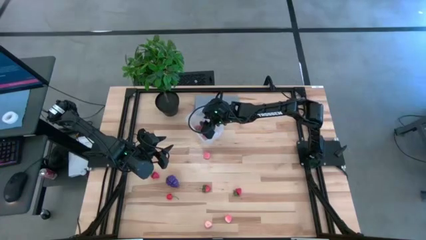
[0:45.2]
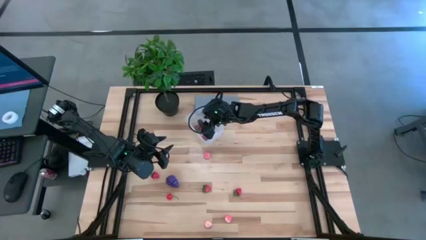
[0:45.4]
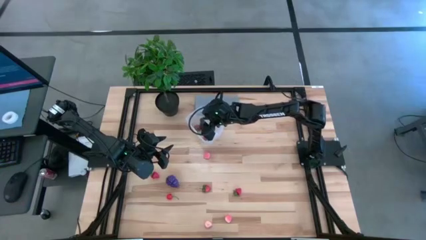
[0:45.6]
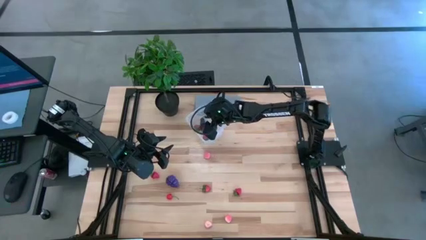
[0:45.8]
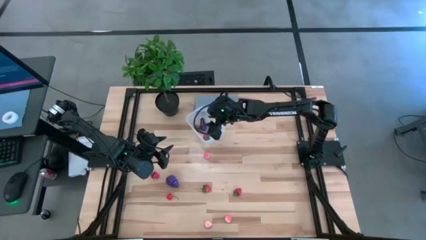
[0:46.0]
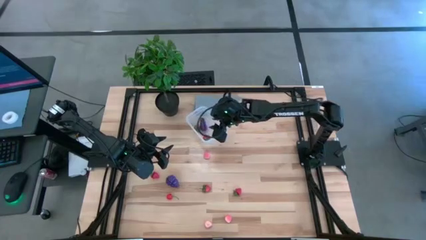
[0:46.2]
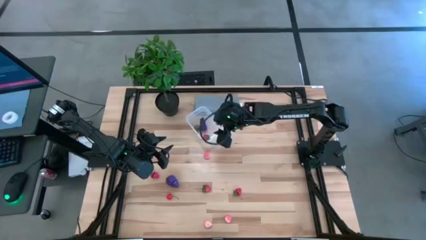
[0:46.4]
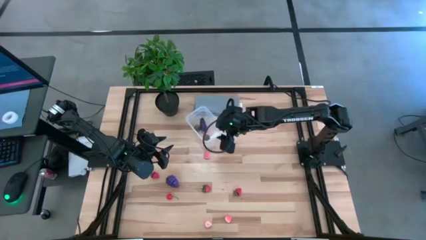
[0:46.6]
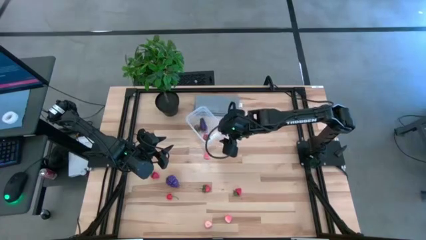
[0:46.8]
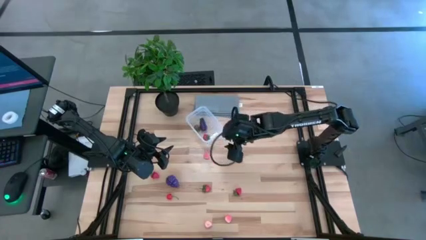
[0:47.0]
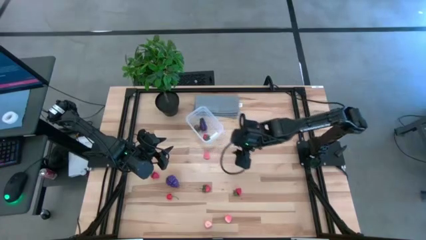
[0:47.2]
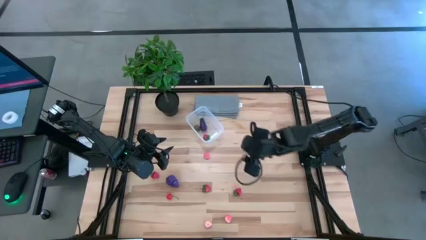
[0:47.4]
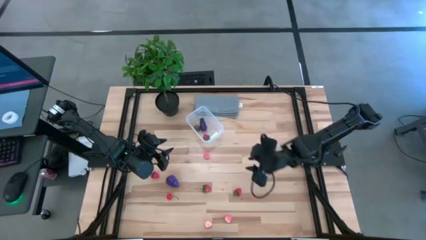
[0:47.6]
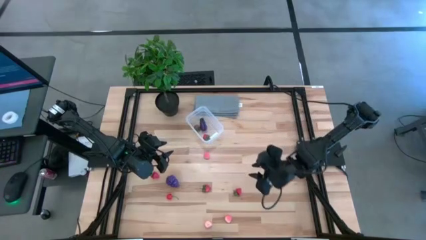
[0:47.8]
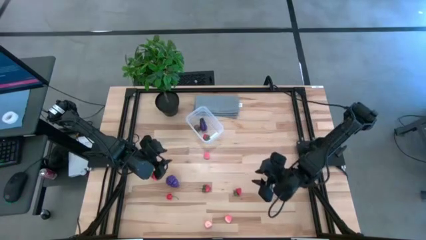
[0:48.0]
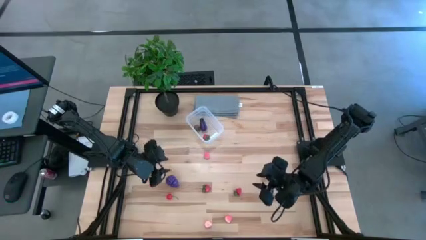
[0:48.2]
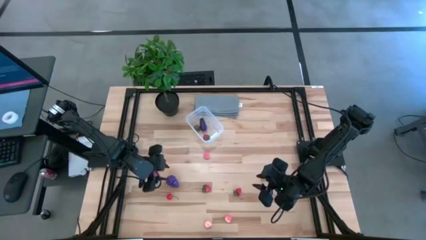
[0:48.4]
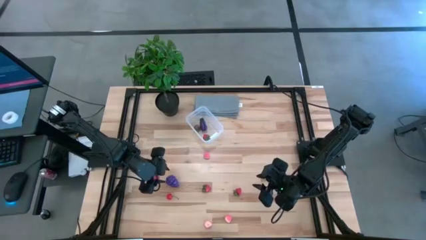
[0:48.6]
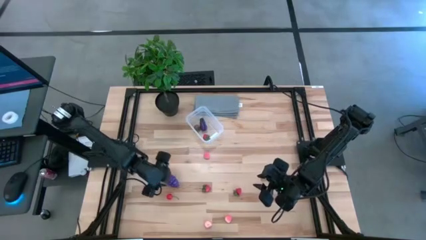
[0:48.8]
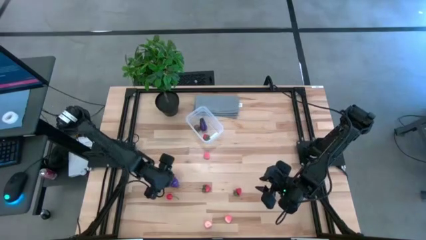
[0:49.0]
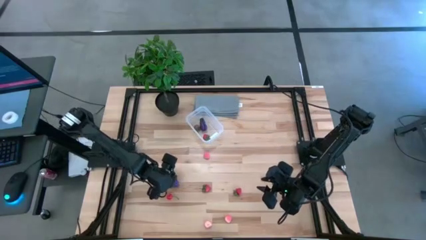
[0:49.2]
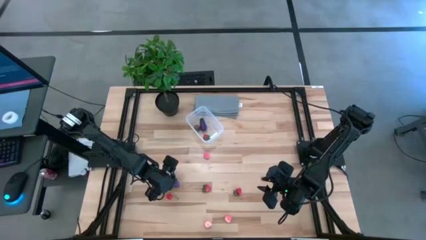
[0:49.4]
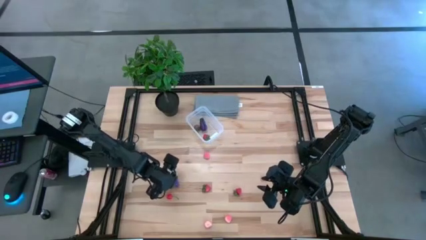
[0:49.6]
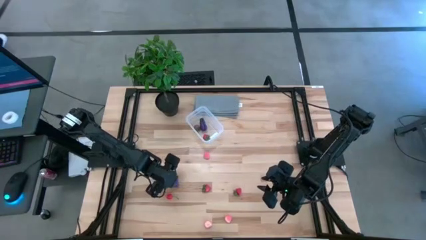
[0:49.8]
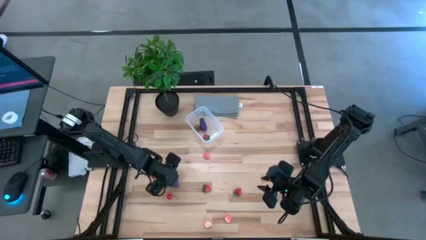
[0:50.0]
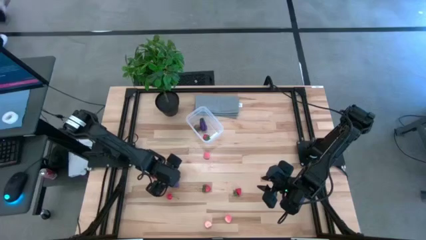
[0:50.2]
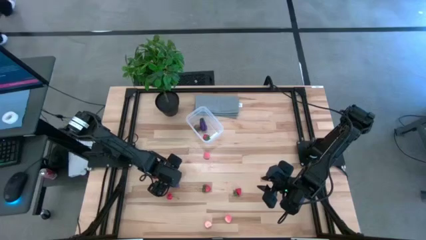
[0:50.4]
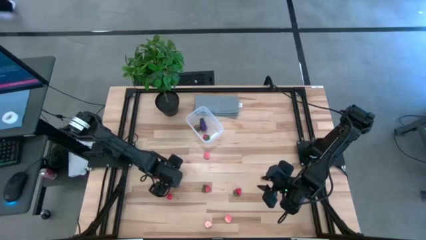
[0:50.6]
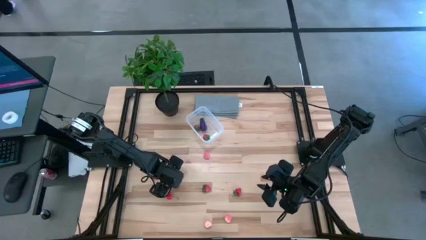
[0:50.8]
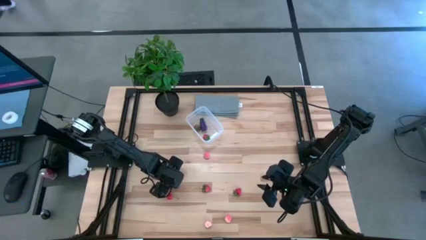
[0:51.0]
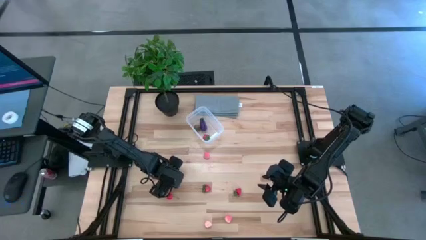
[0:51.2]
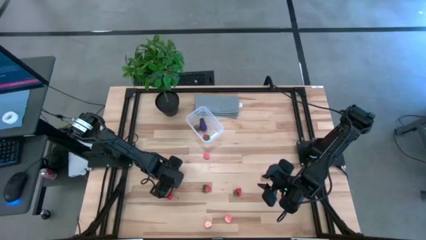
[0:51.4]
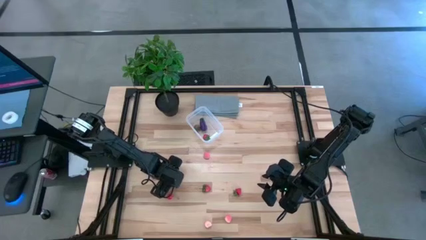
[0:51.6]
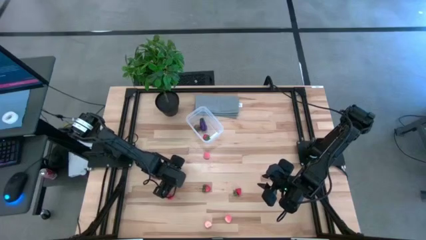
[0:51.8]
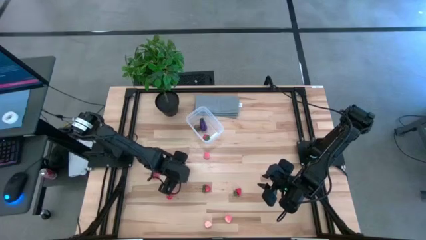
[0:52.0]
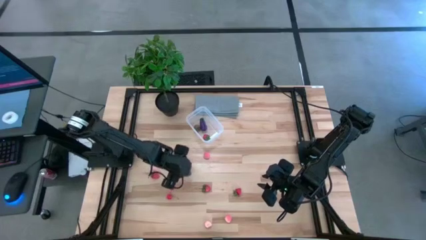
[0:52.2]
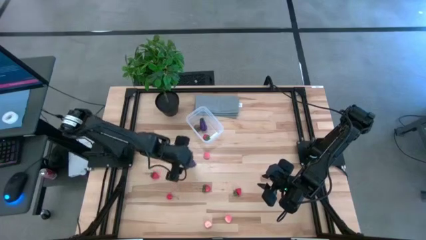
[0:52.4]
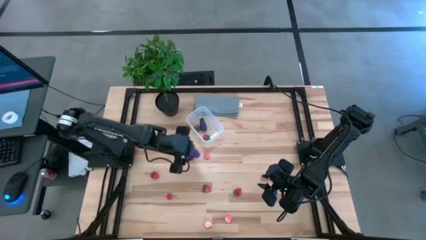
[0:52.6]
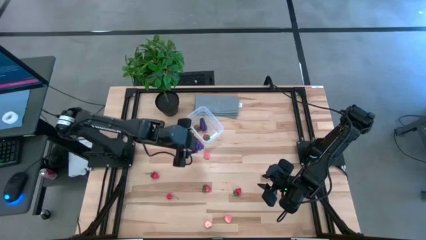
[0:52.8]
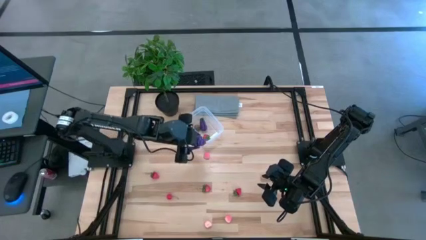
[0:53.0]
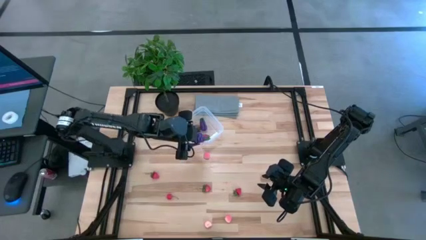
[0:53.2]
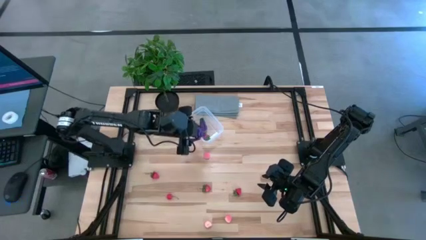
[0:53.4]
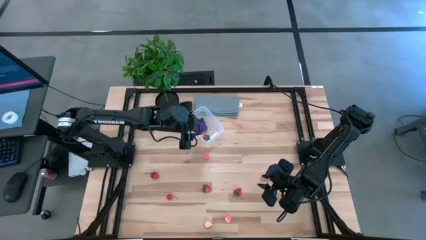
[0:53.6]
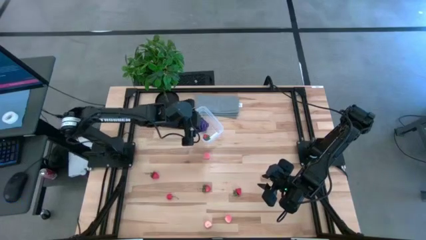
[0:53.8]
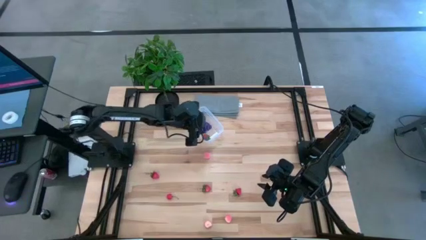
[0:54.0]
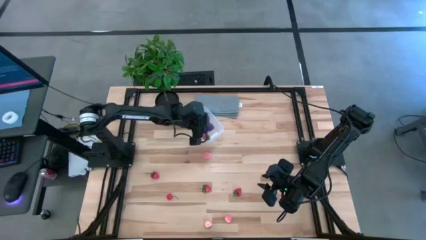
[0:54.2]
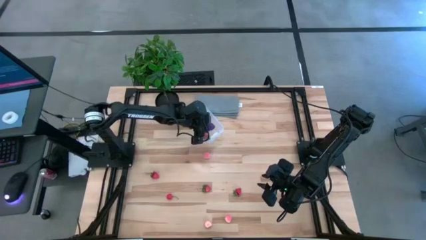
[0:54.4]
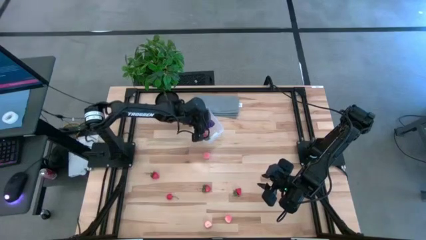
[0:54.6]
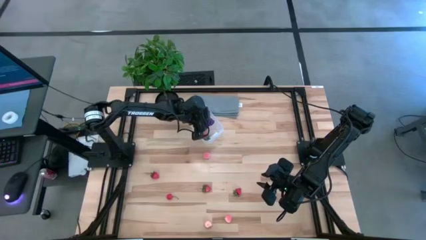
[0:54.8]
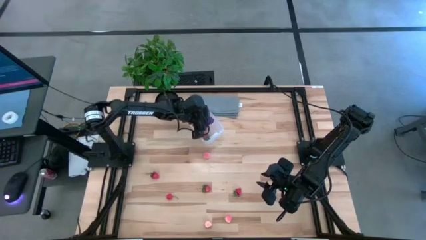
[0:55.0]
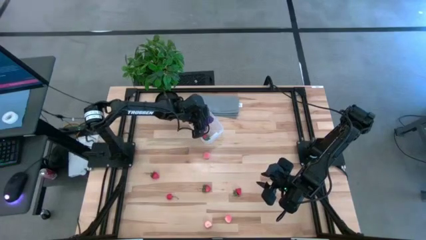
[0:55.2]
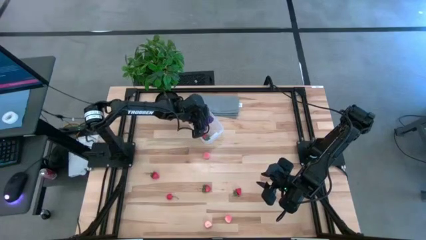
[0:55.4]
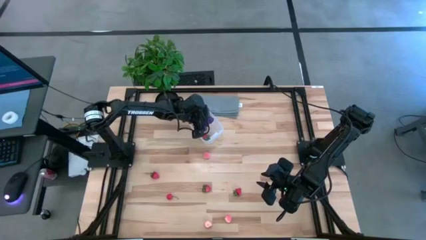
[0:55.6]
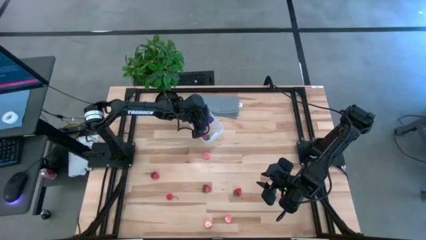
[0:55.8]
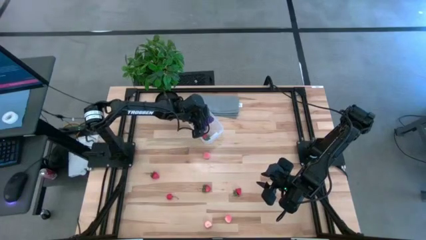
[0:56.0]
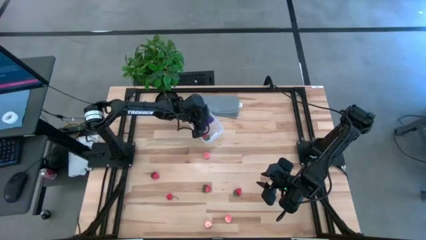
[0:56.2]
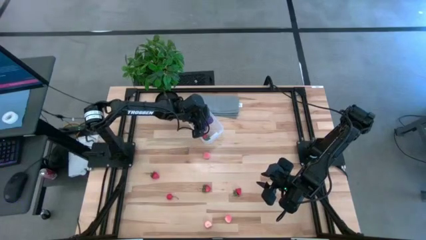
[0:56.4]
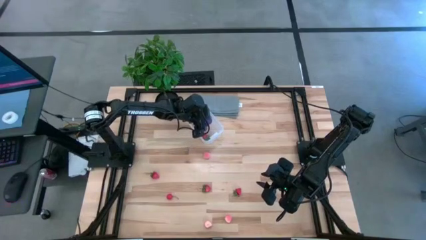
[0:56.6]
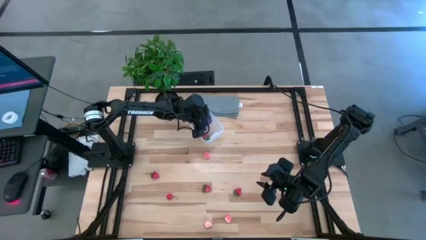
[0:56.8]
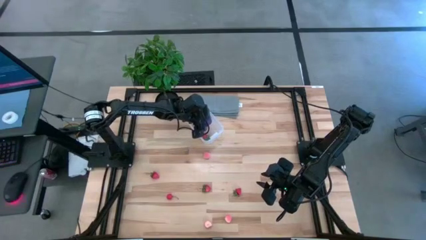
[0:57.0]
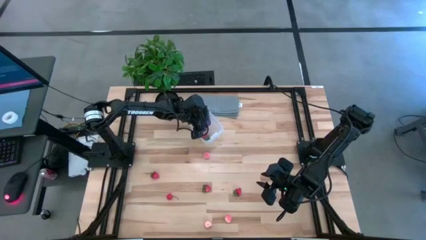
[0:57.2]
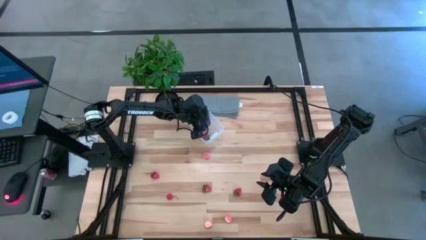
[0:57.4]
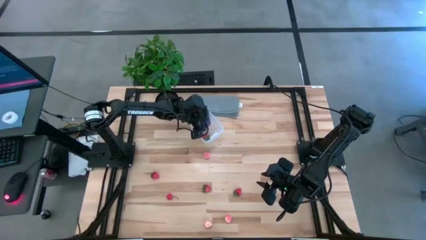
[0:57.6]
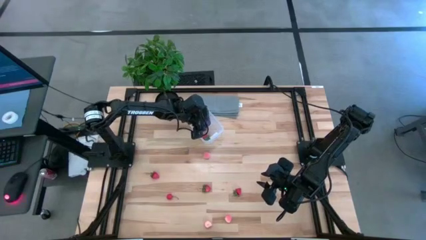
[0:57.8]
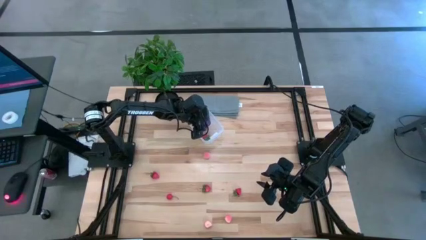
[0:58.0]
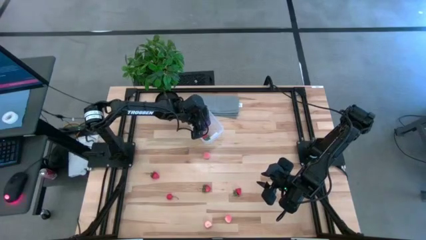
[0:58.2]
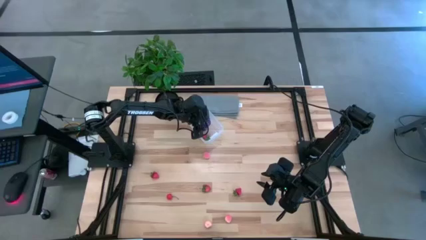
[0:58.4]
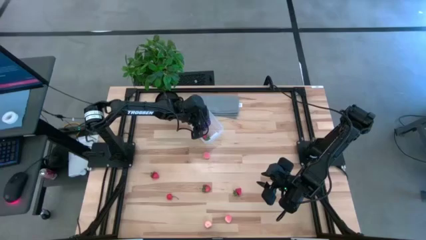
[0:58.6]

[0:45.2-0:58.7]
Task: Pick and placing Produce into tupperware
Put the violet grapes into the transparent bin
